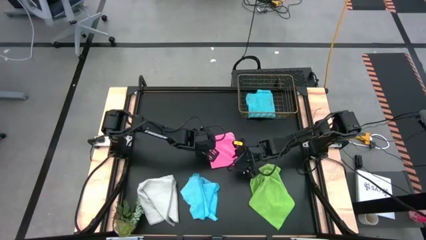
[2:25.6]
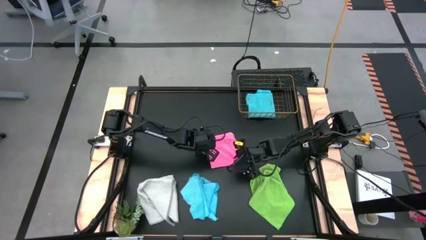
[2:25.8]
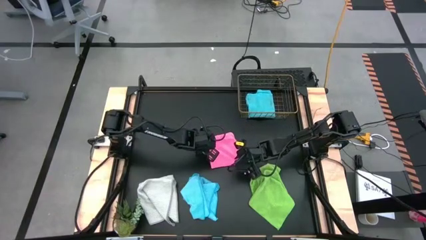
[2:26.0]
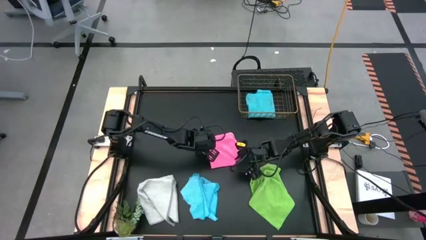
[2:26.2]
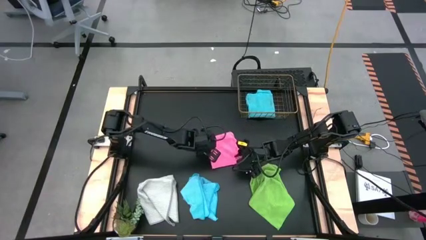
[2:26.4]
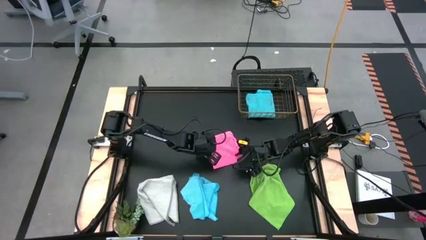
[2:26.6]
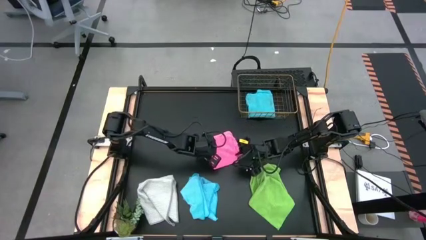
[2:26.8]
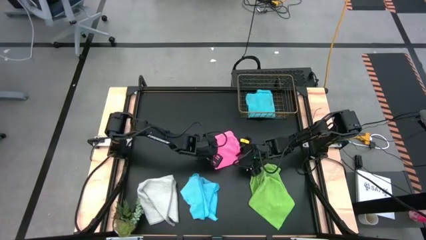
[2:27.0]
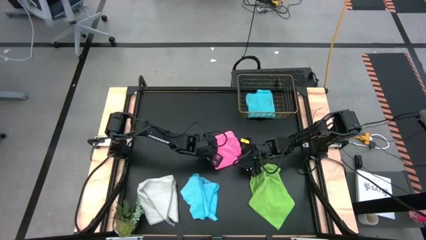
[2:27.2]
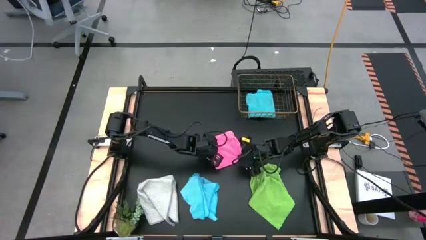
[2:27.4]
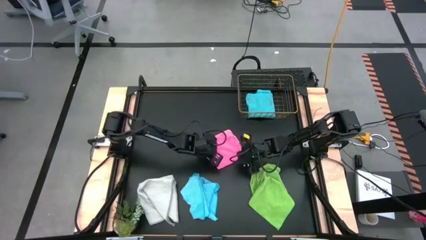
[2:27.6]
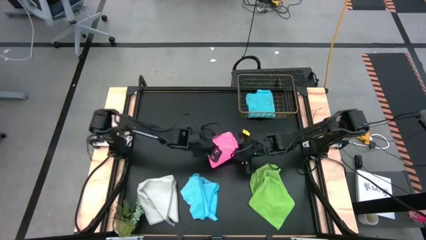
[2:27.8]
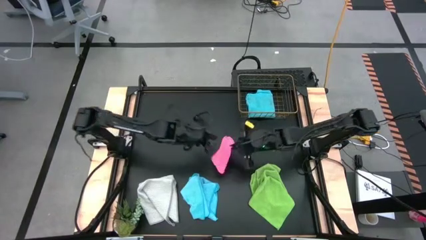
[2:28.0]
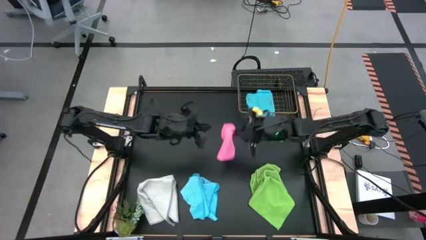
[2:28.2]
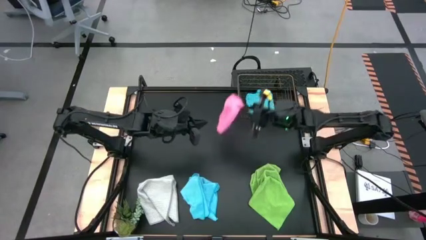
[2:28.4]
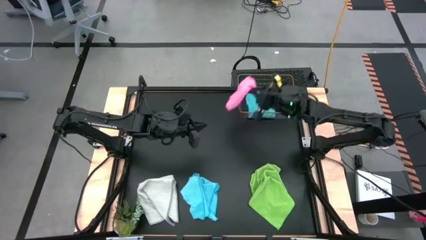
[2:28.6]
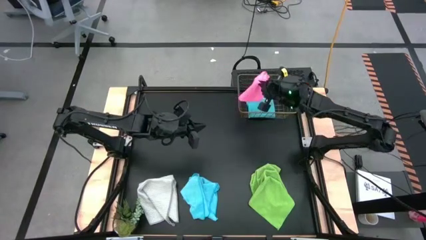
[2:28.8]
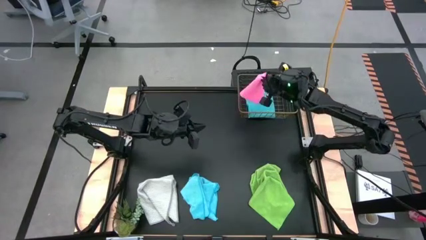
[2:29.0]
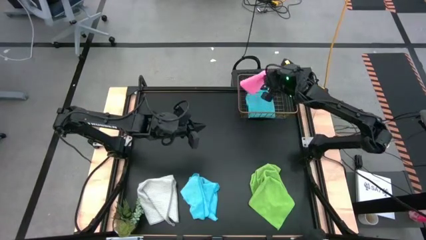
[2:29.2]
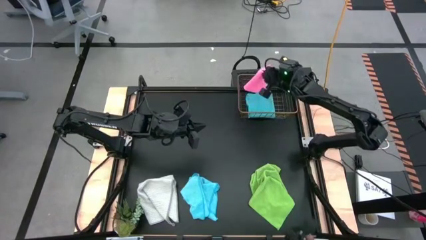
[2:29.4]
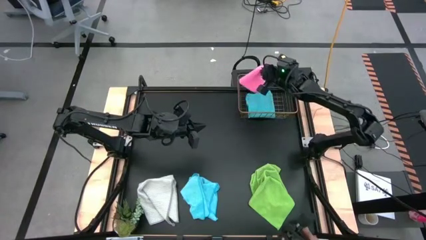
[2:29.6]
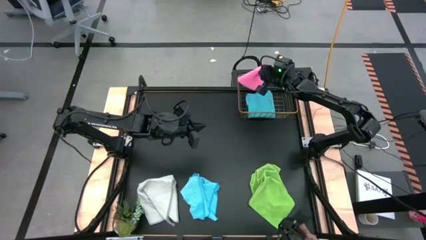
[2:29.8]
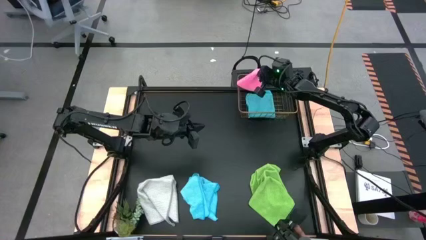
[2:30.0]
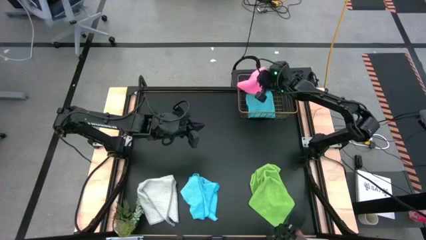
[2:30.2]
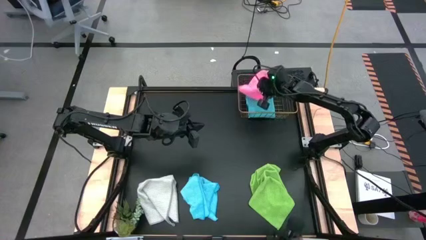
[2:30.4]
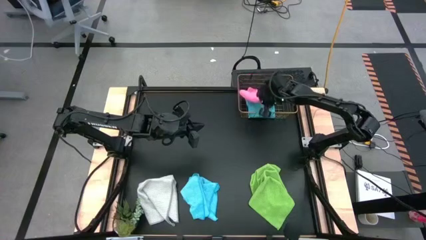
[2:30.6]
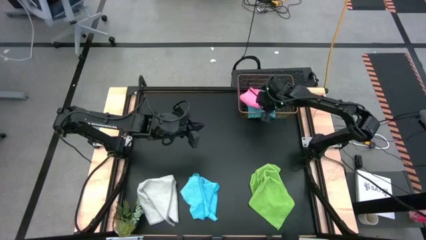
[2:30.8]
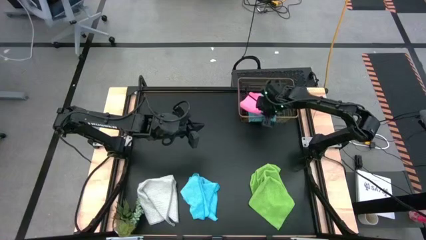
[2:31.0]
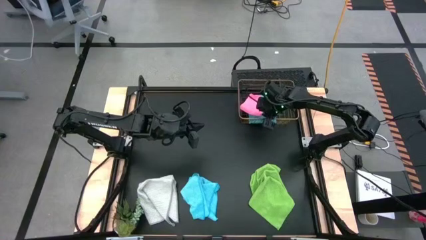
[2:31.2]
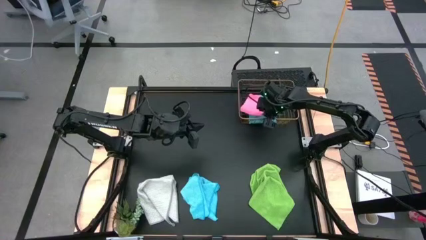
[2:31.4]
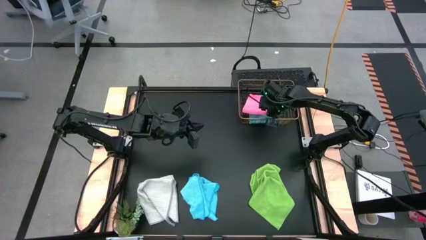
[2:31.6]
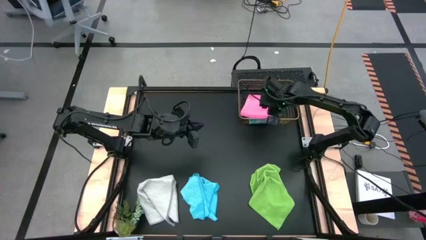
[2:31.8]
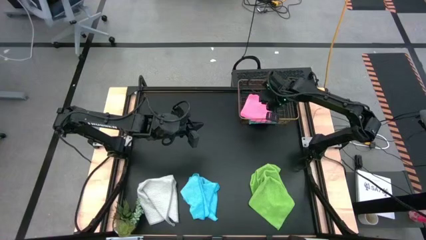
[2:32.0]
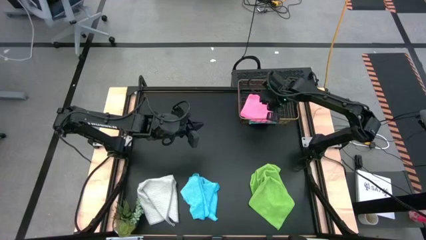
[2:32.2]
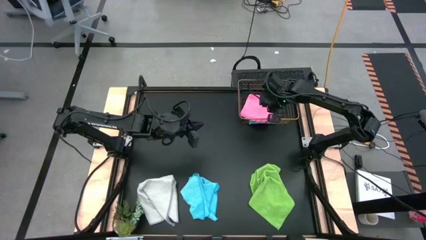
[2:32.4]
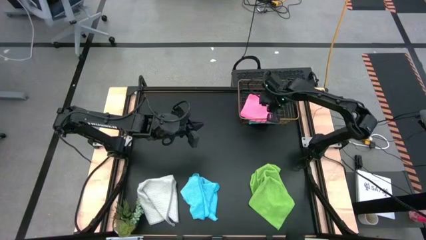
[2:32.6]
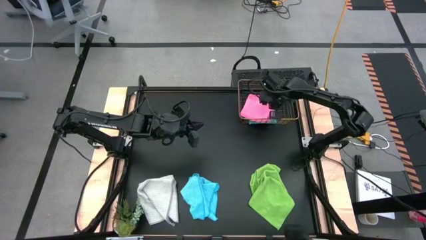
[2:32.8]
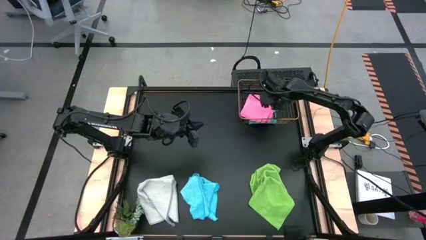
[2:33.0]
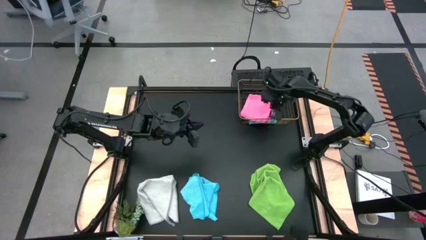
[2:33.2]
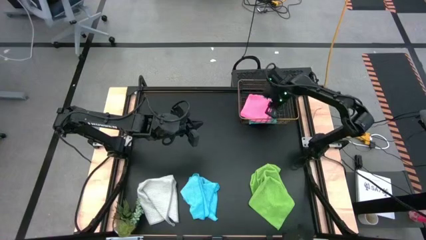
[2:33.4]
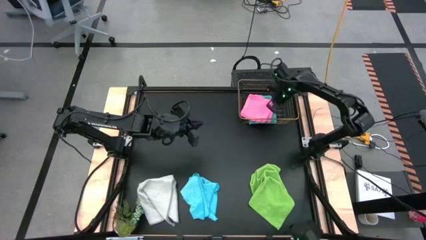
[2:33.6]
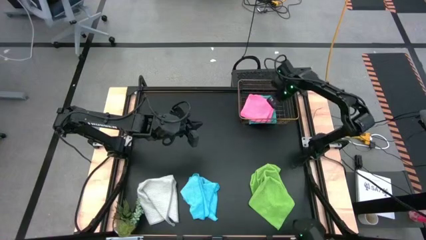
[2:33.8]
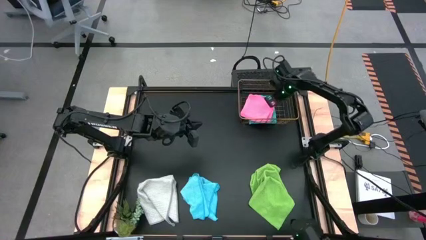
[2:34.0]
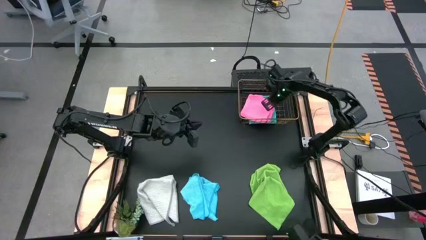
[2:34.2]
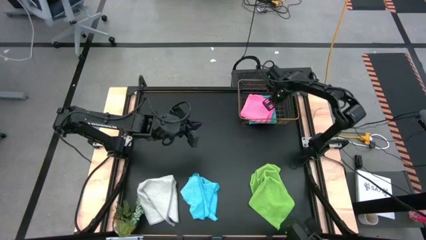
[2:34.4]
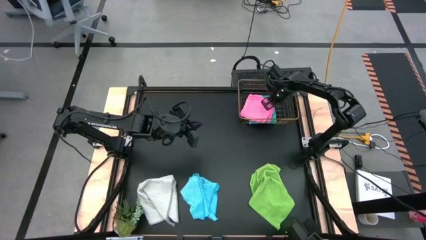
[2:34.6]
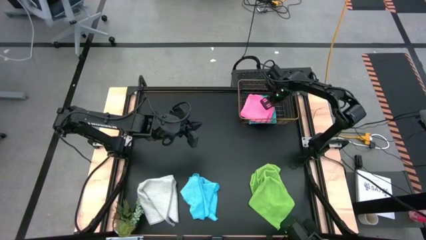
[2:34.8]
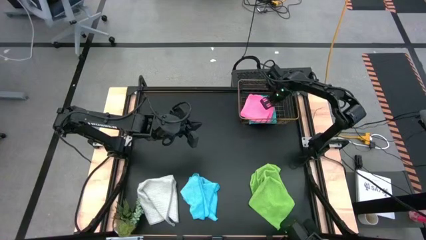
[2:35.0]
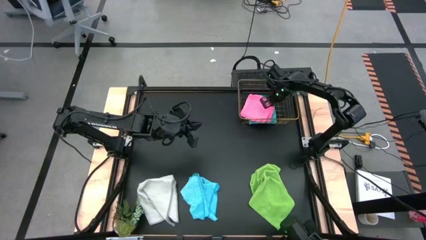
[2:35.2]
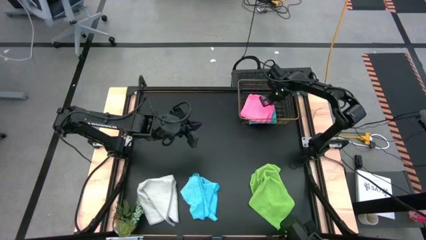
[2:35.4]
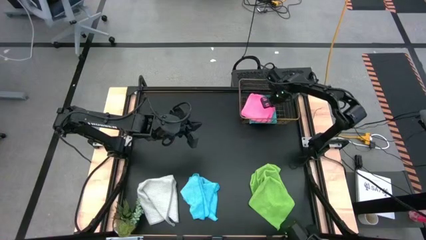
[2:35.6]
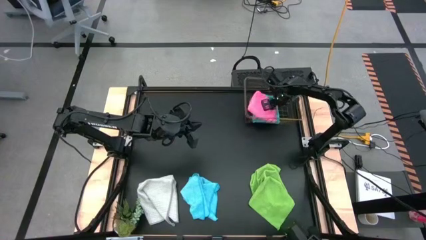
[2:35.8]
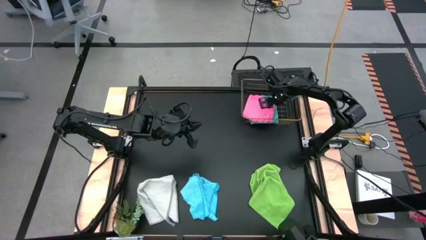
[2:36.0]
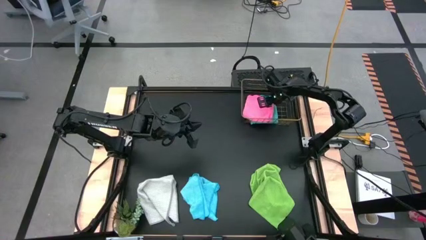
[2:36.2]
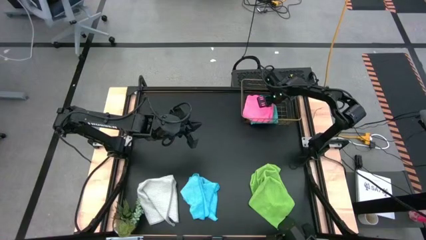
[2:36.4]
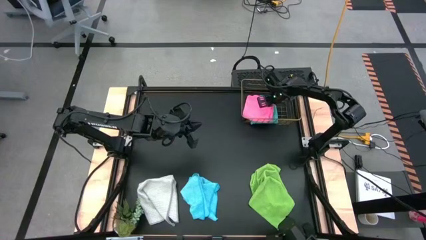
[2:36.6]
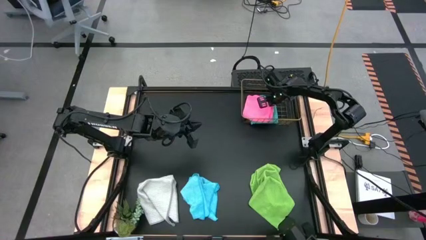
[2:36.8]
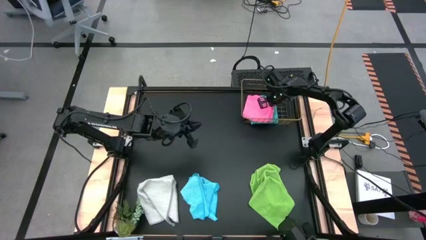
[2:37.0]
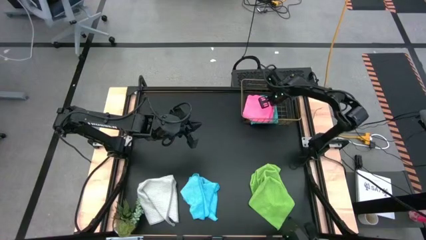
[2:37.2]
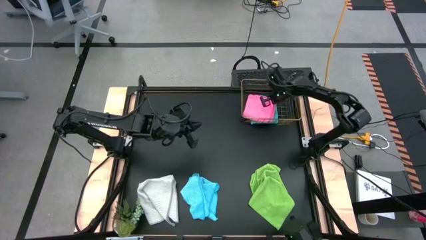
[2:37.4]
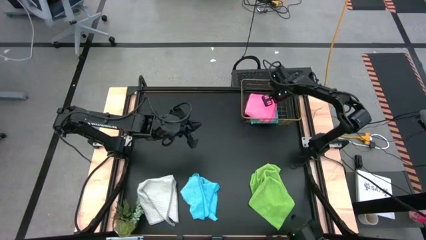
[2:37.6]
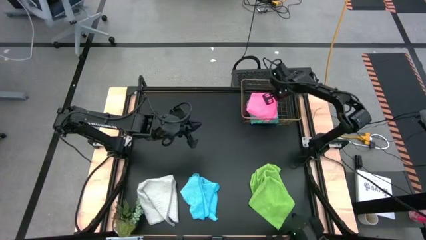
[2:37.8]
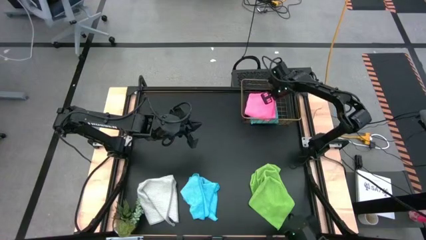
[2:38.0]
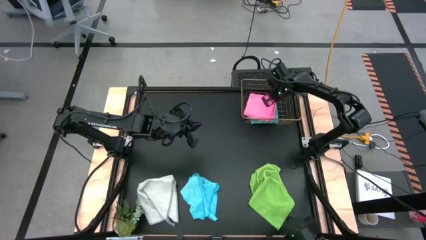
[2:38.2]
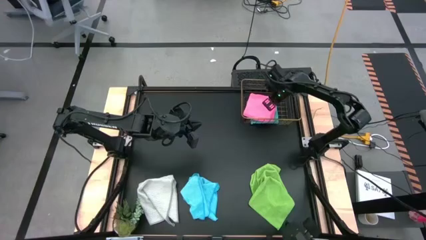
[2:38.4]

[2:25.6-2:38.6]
Task: Fold microfiber towels
Put the folded pink towel into the gold wire basket

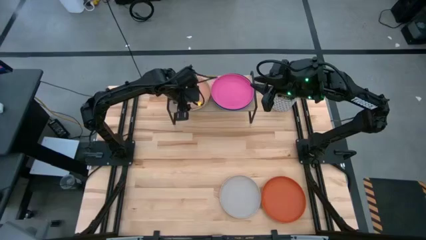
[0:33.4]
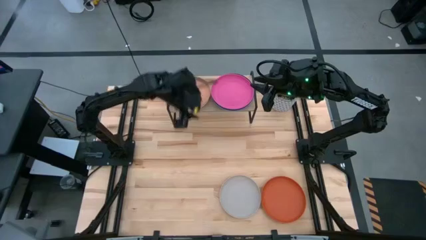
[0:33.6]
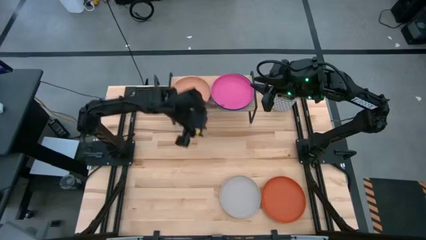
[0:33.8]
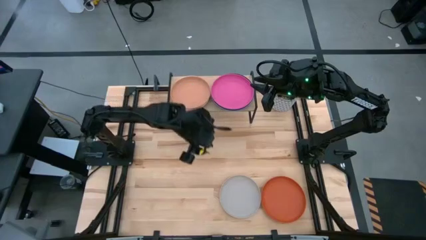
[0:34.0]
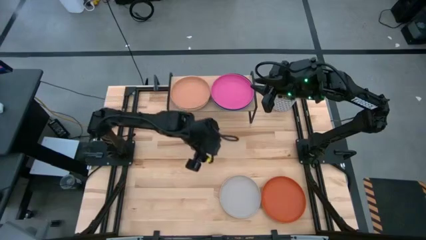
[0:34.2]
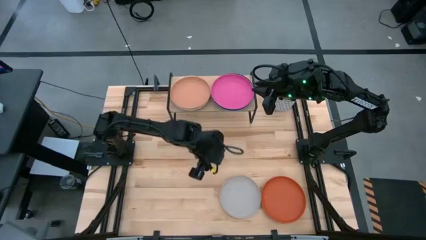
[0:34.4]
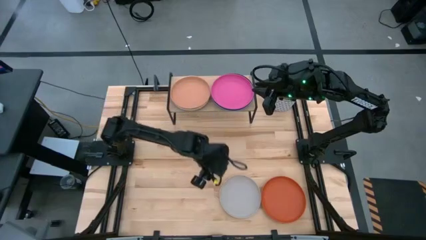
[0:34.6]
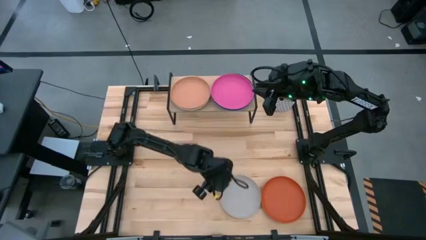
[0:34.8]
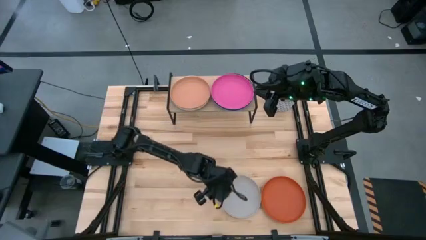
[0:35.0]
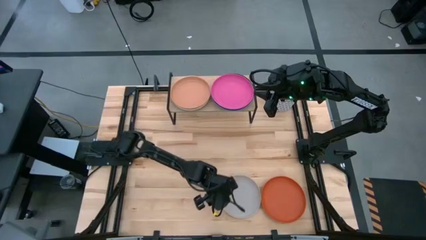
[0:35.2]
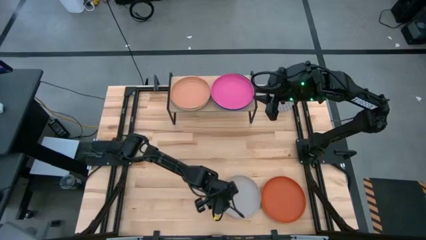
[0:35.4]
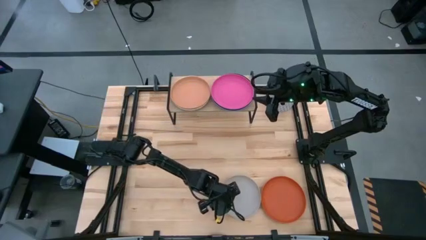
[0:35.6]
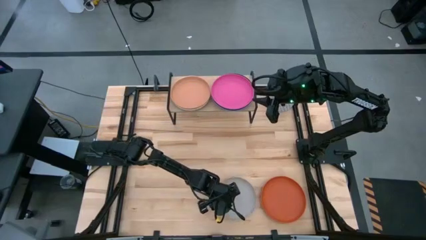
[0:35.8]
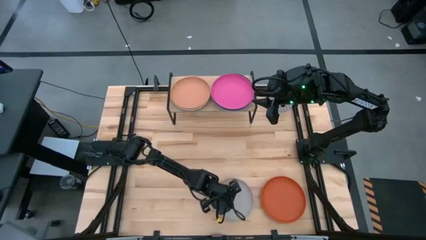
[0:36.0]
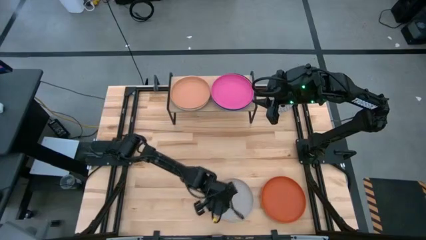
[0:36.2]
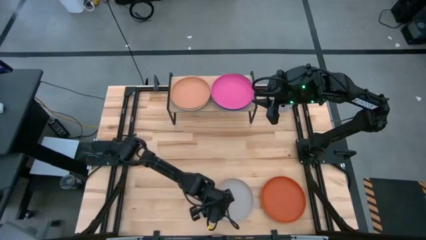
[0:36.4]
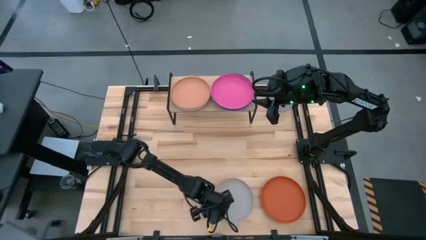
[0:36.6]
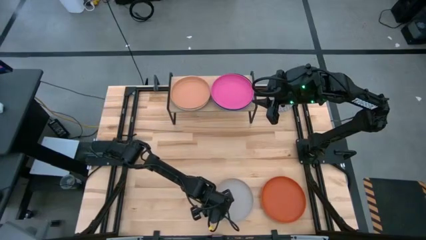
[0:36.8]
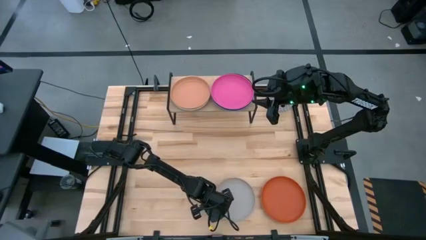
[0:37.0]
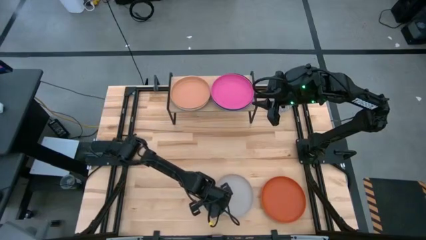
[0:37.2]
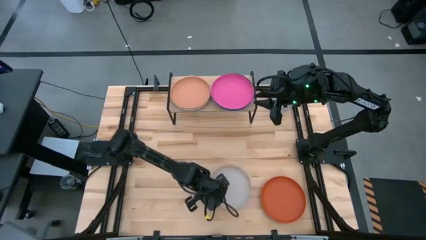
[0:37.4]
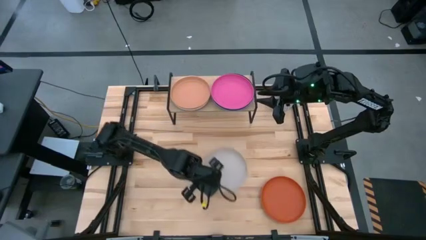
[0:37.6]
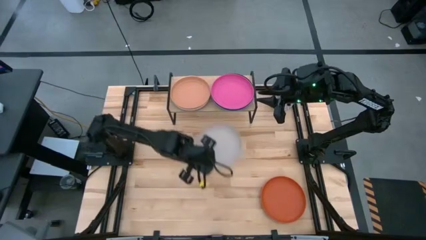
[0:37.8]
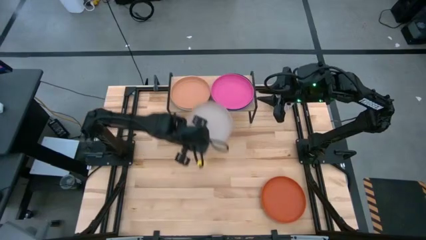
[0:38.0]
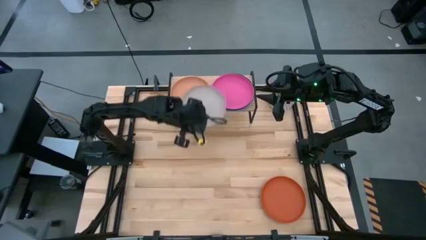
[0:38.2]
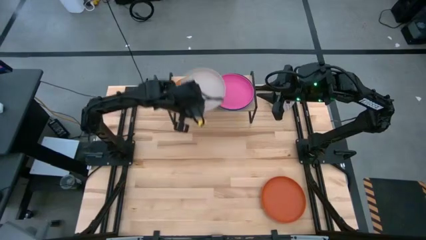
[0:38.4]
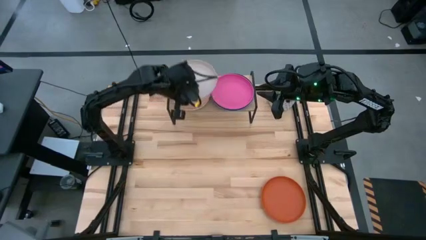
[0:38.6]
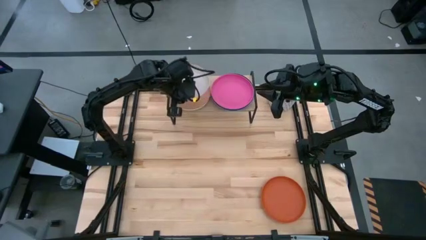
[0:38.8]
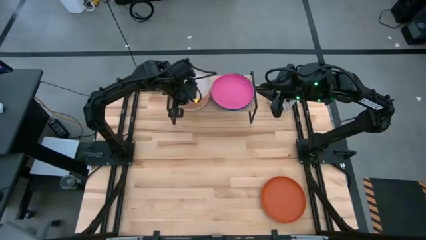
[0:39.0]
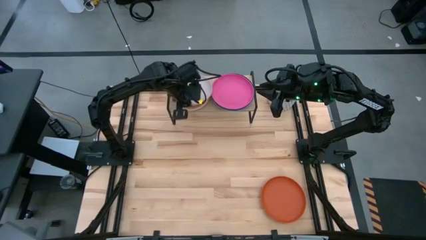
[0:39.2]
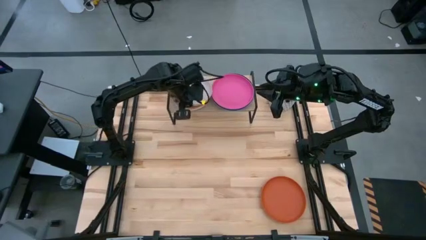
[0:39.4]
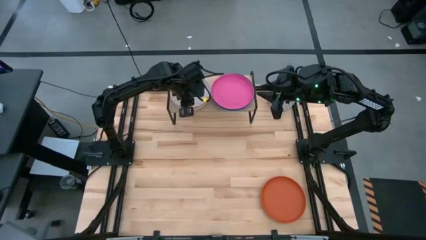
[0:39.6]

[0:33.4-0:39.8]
Task: Place and stack plates onto a shelf
Stack the gray plate on top of the brown plate on the shelf
